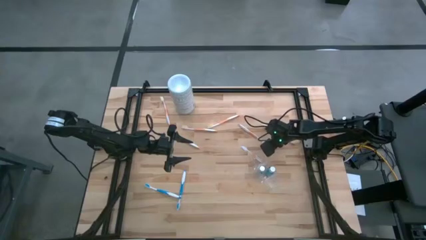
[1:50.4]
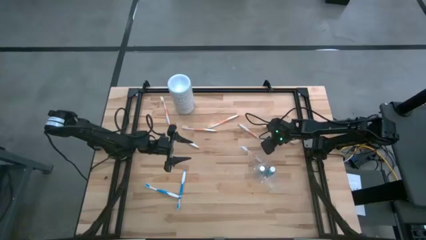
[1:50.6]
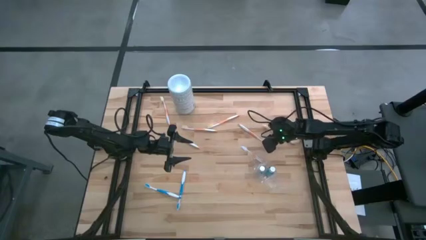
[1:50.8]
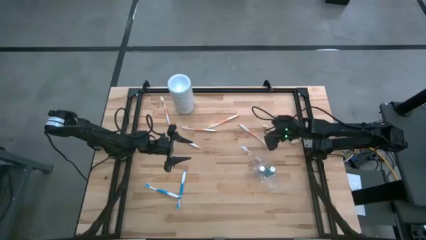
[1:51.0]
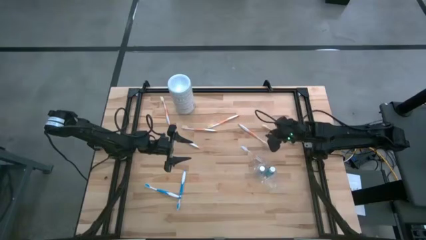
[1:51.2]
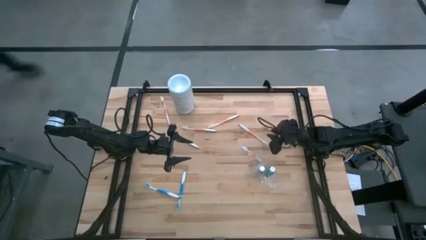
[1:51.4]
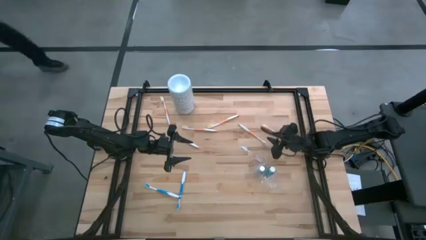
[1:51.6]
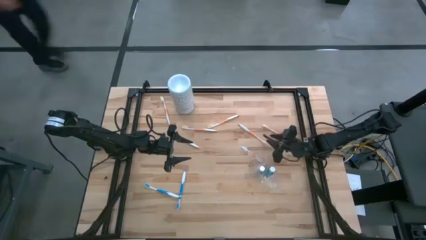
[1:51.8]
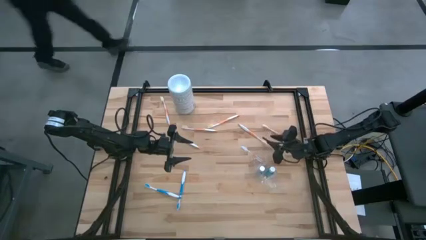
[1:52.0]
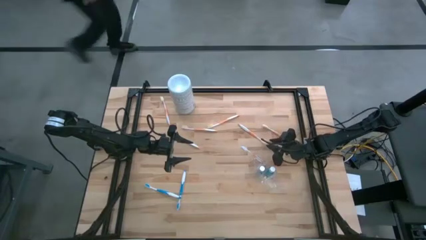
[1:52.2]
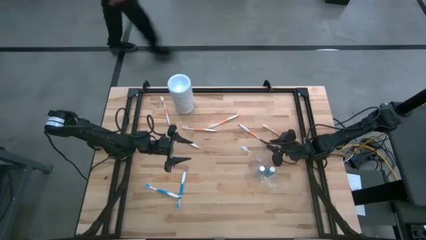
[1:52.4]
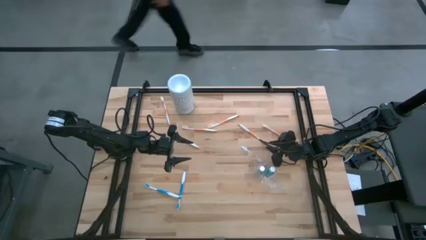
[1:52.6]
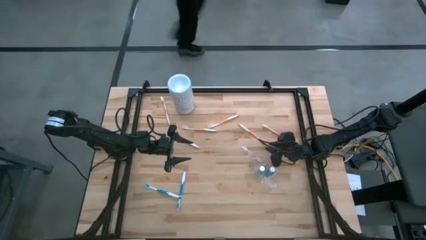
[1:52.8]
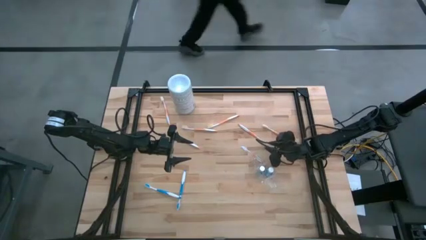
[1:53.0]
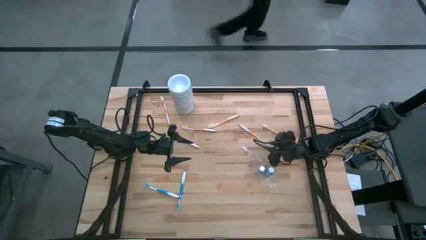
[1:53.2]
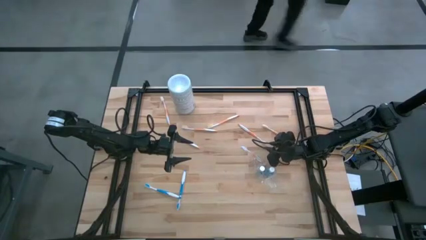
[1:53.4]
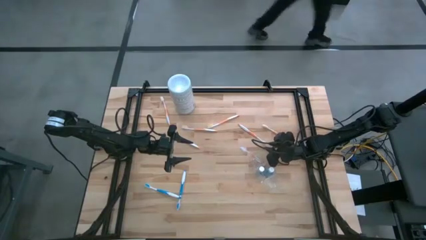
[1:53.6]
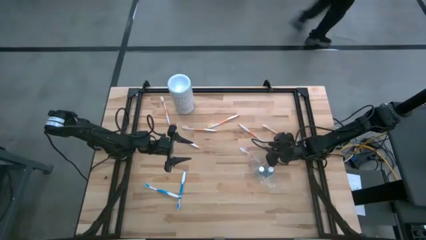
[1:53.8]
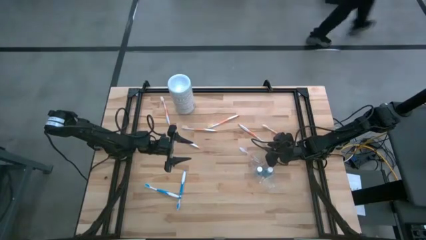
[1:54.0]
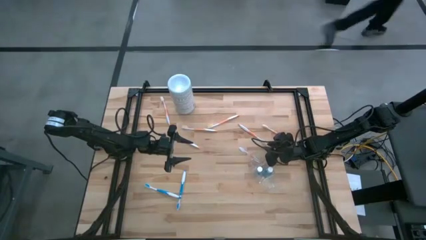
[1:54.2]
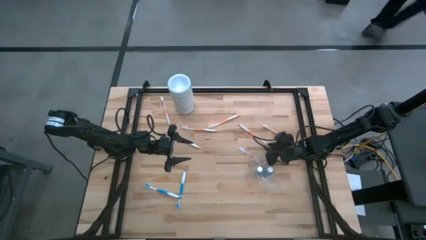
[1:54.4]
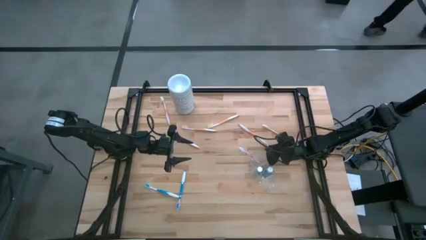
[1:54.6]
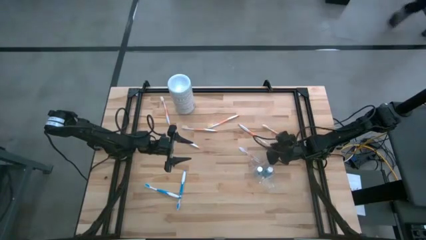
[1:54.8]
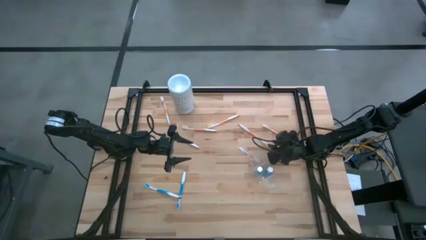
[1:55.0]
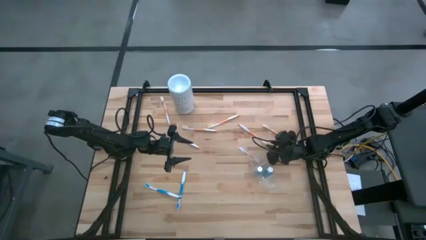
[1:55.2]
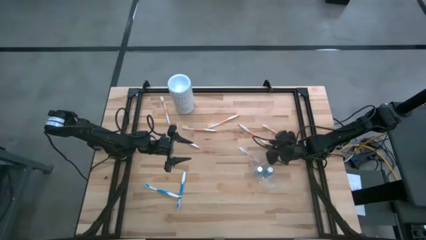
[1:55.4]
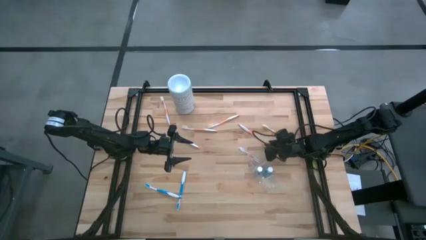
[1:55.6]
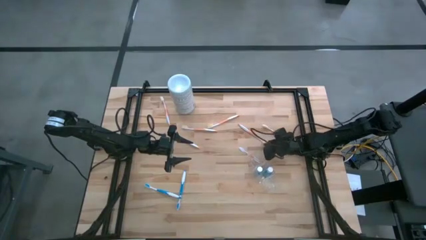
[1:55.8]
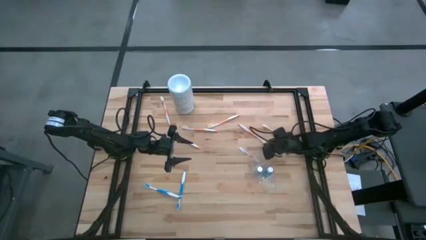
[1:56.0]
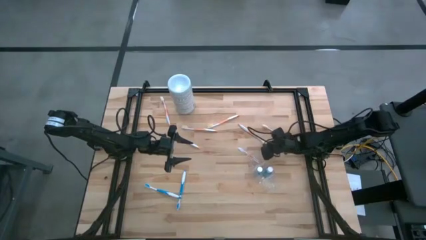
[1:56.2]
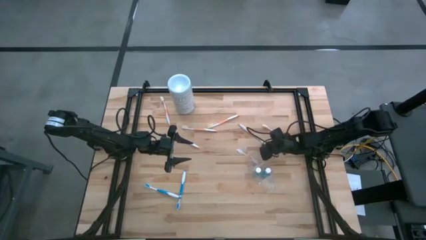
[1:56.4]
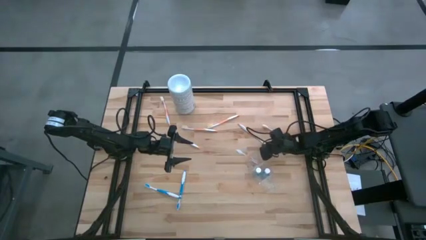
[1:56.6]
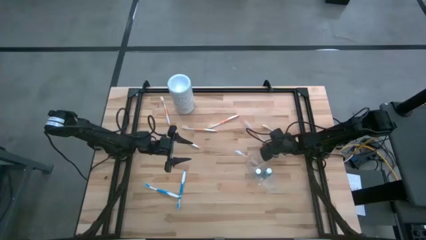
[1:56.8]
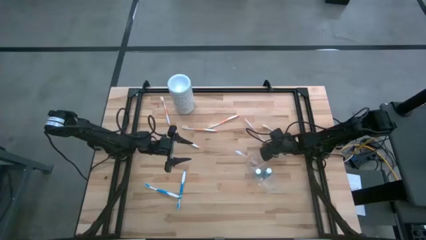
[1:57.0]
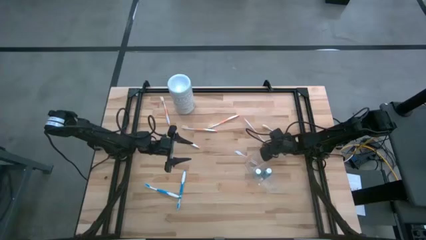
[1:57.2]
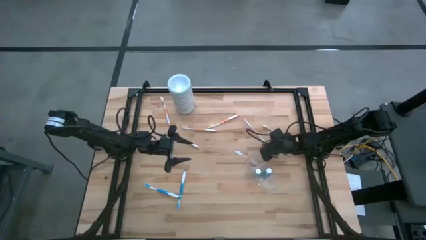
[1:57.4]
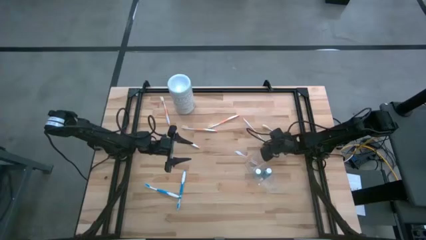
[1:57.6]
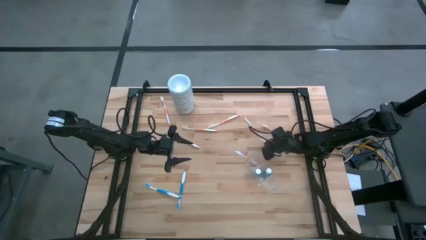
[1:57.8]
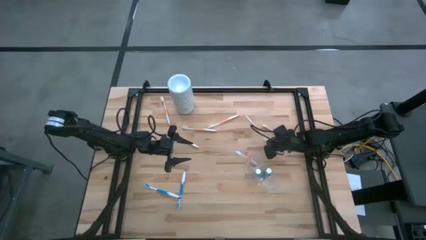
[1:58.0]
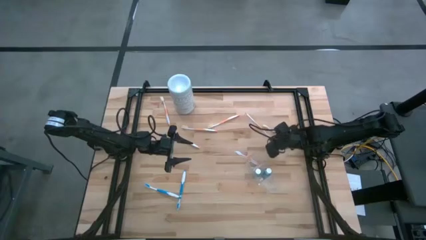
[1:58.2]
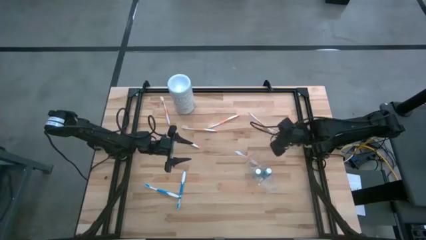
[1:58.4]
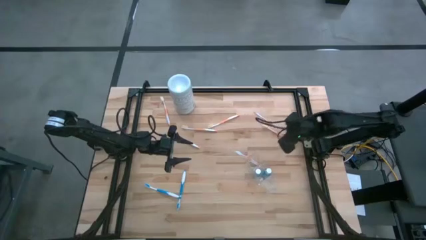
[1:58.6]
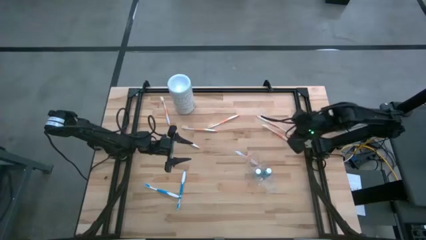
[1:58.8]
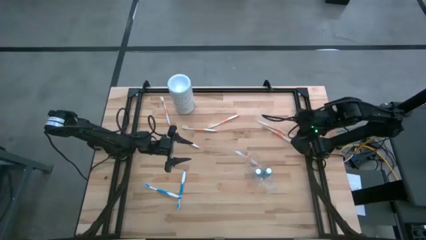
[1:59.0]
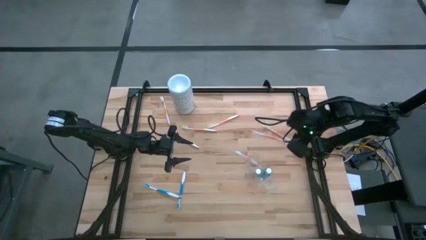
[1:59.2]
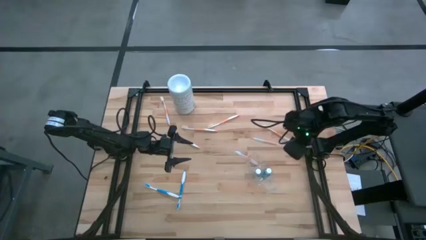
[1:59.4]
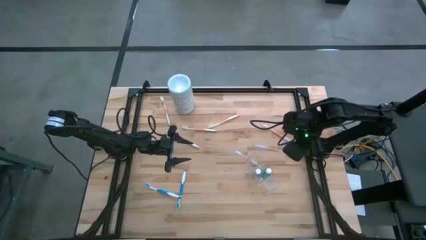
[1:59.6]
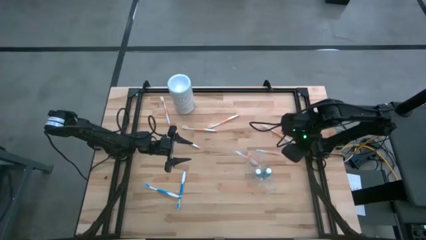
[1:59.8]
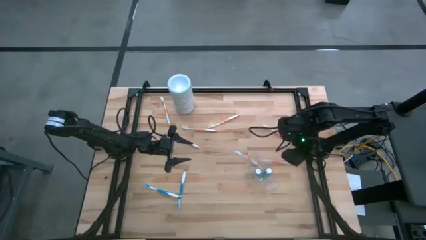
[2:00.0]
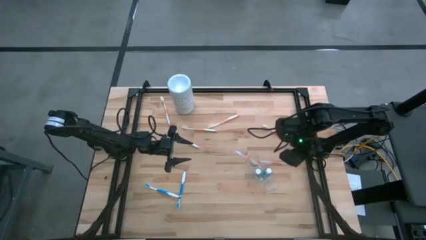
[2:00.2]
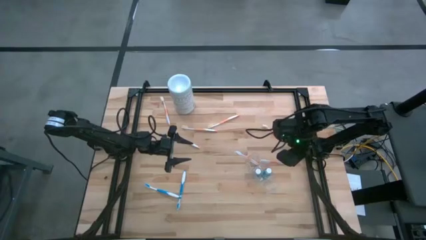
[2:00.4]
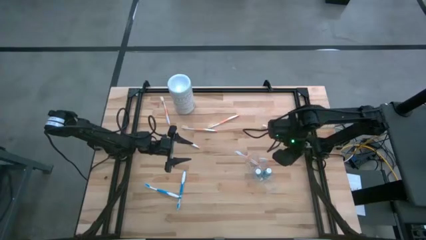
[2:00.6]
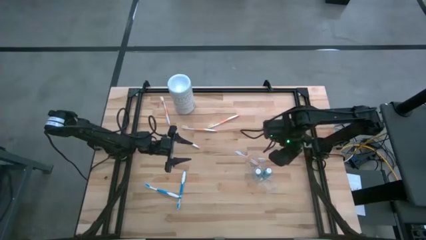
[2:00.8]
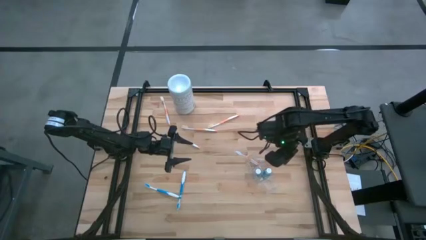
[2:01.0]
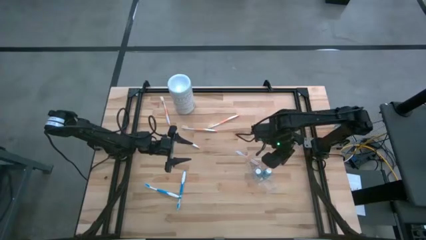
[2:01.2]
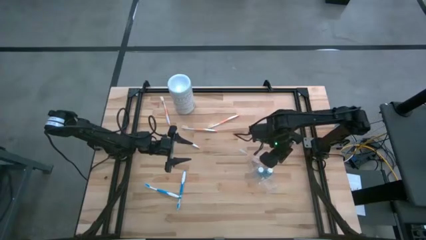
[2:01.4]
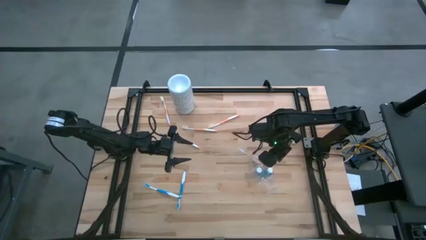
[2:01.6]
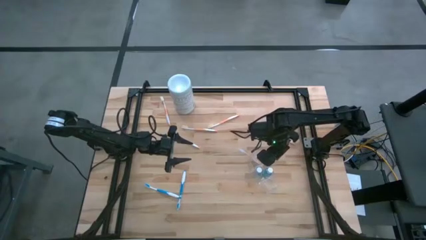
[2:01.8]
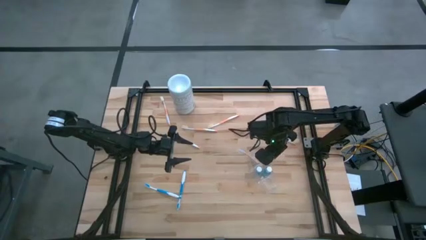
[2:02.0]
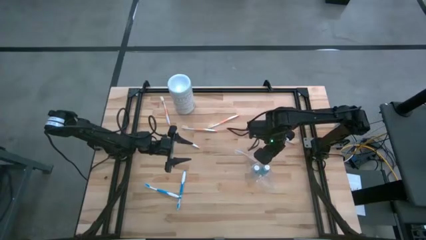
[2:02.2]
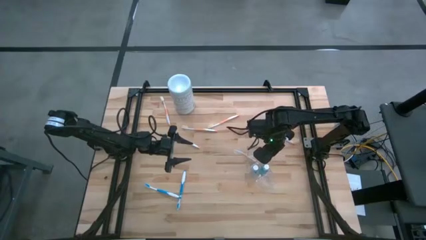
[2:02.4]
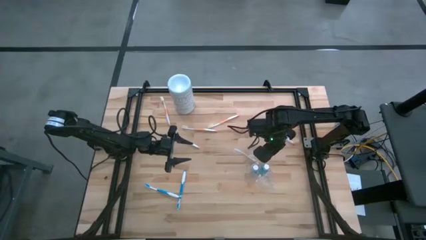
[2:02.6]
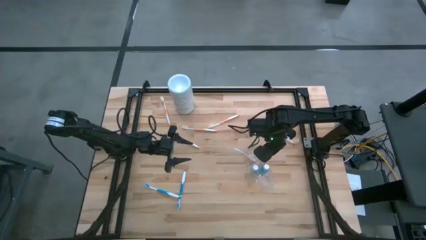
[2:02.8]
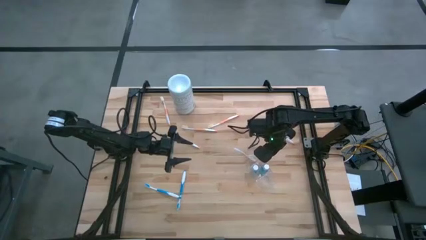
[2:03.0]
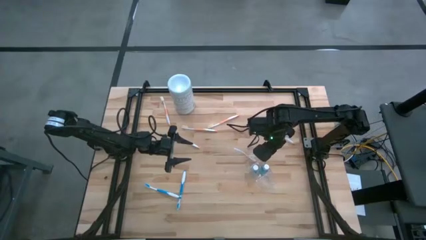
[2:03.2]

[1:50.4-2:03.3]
Task: Pick & Place toothbrushing station
Put the orange toothbrush into the top section of the transparent organizer

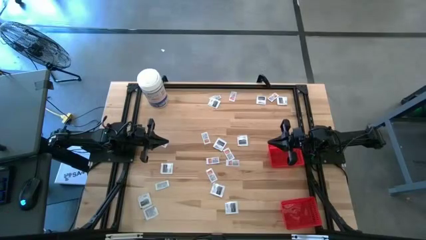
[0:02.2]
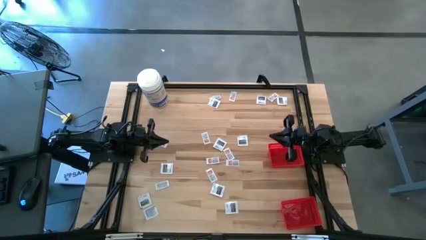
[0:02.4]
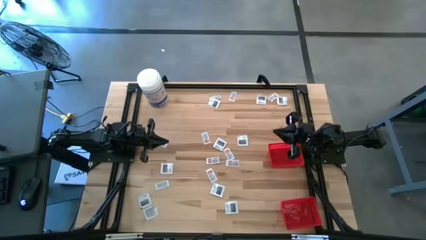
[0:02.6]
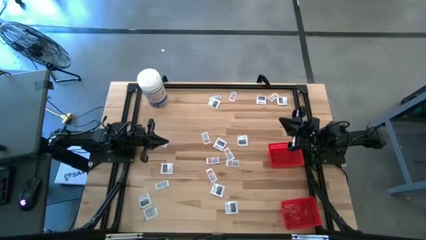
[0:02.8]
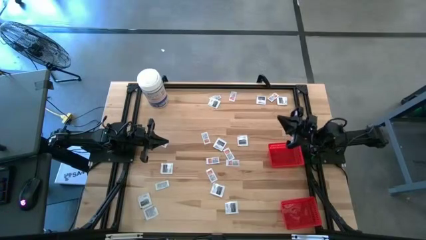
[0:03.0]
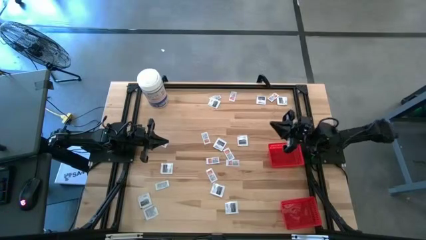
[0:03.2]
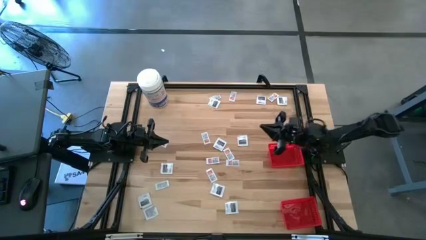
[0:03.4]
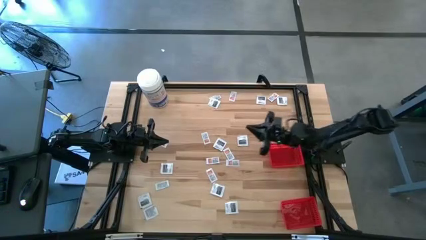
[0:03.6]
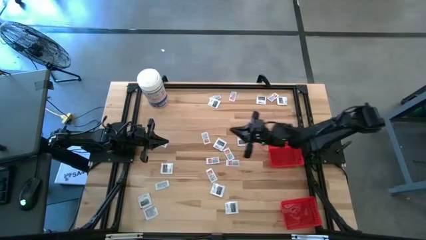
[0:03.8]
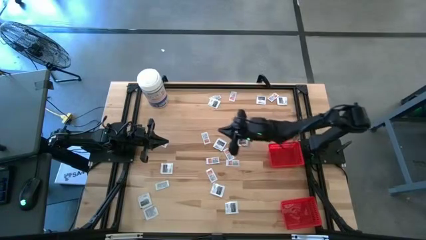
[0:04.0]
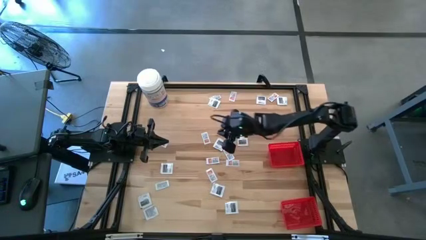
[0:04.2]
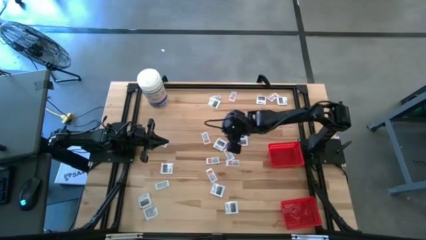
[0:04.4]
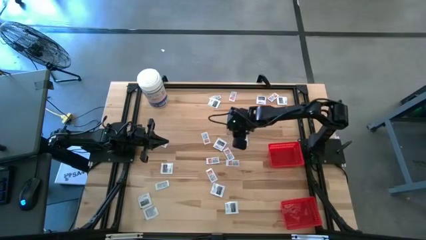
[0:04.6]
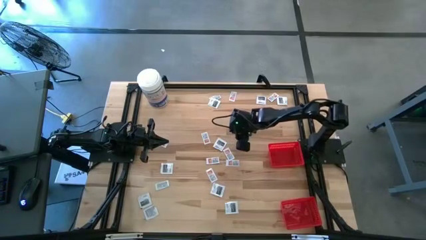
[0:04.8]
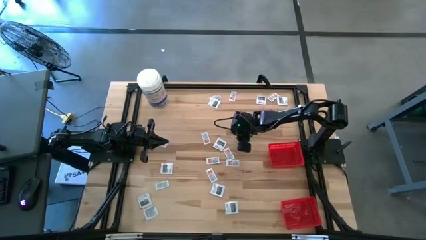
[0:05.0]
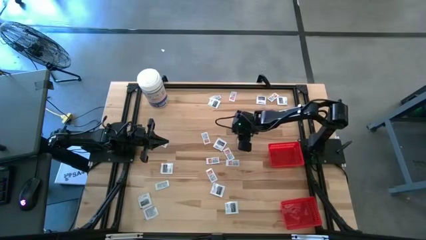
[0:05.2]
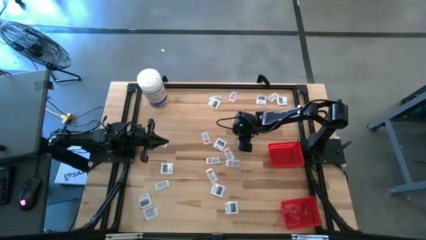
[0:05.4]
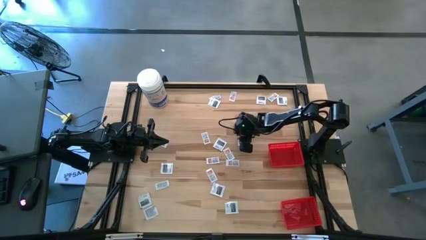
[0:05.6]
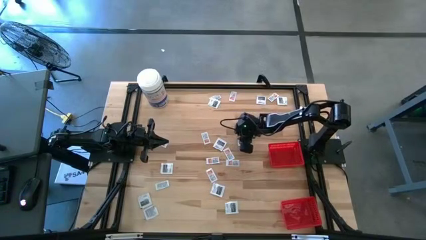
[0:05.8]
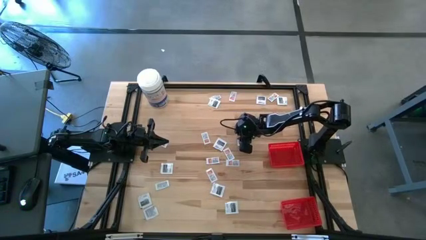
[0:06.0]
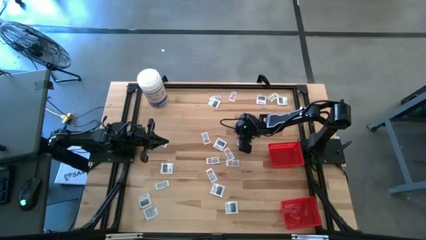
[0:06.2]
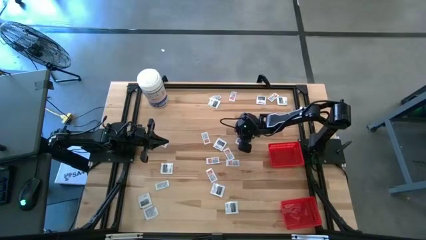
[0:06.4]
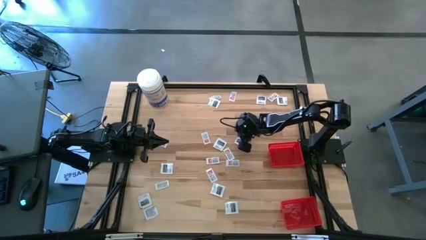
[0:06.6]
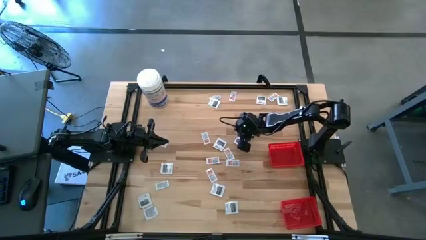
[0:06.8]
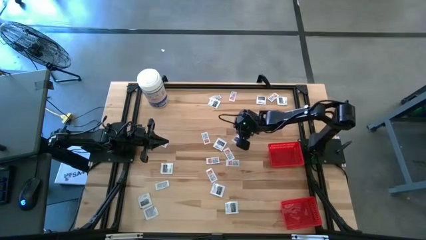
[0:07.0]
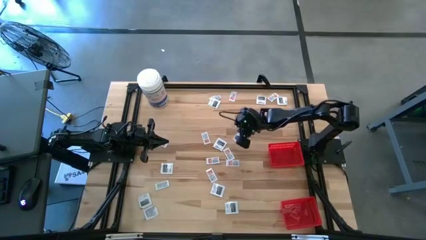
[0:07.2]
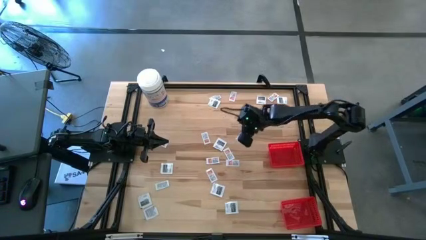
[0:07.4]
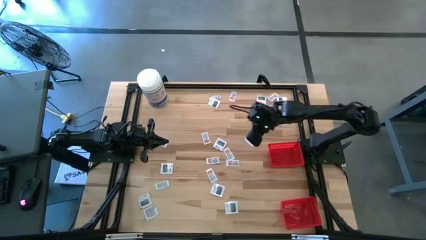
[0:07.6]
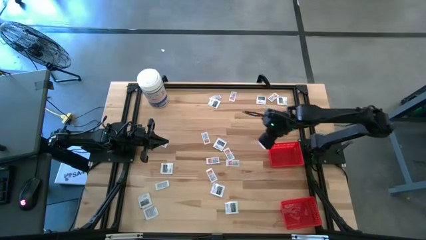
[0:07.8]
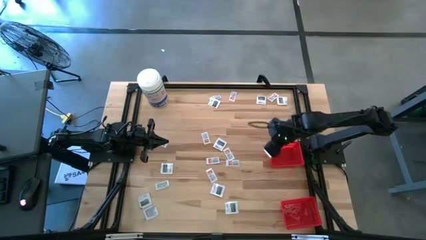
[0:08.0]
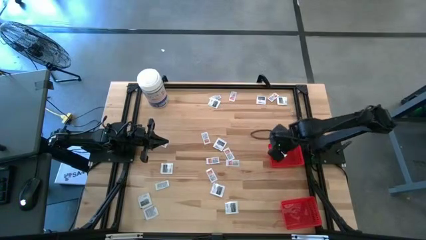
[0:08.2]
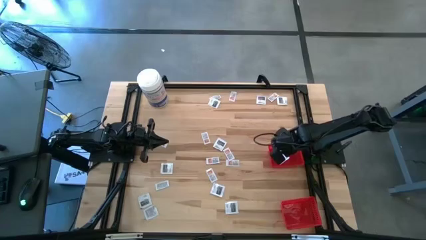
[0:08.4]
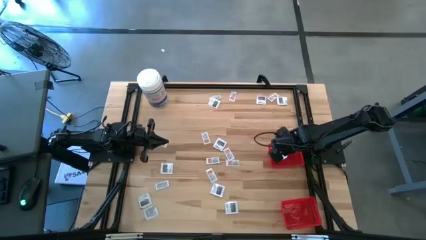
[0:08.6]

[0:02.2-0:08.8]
Task: Pick & Place First Aid Supplies
Put the black towelette pack into the top red basket
